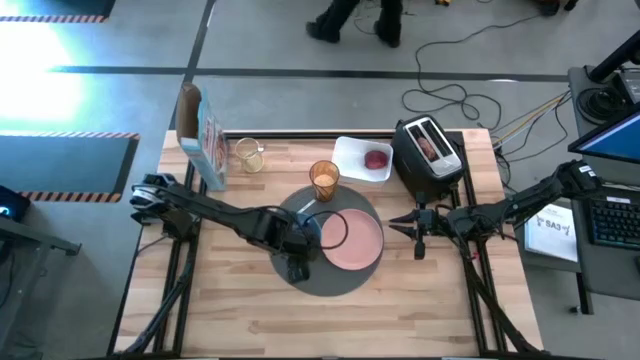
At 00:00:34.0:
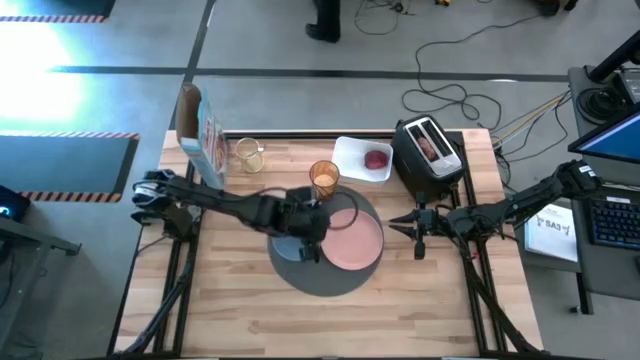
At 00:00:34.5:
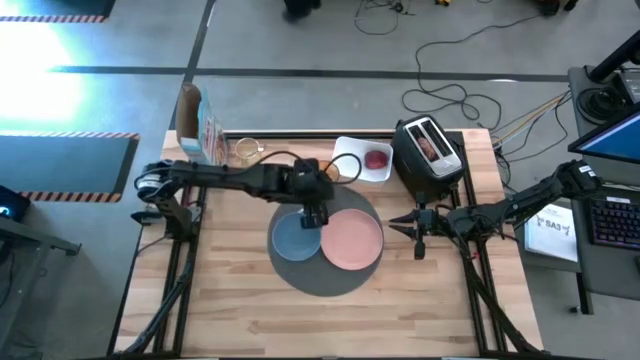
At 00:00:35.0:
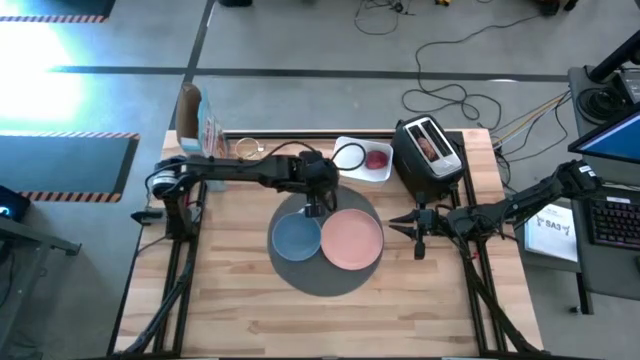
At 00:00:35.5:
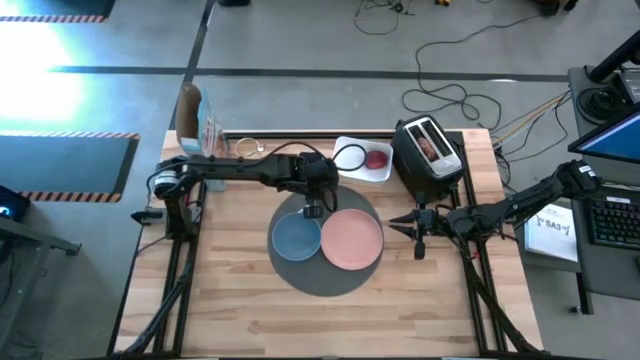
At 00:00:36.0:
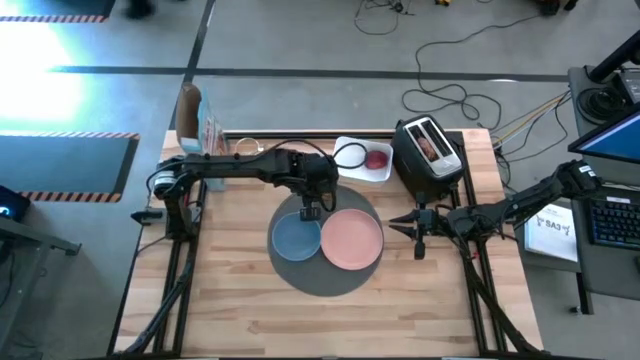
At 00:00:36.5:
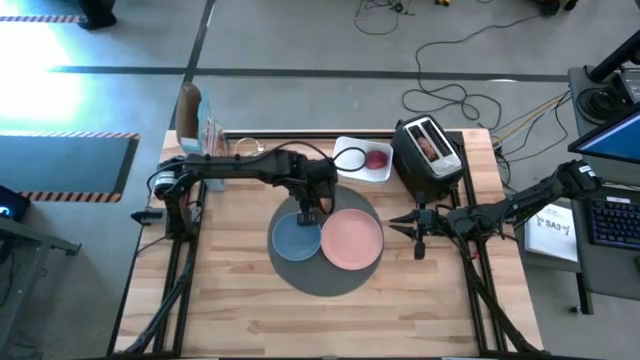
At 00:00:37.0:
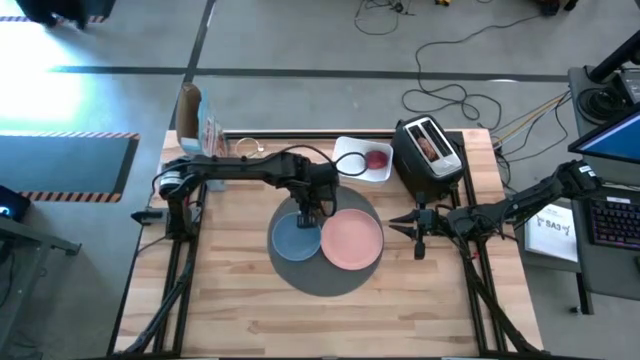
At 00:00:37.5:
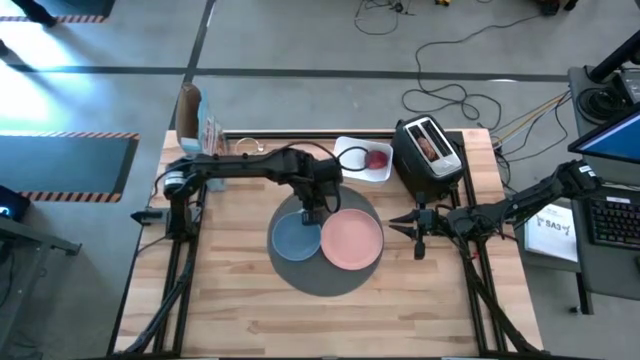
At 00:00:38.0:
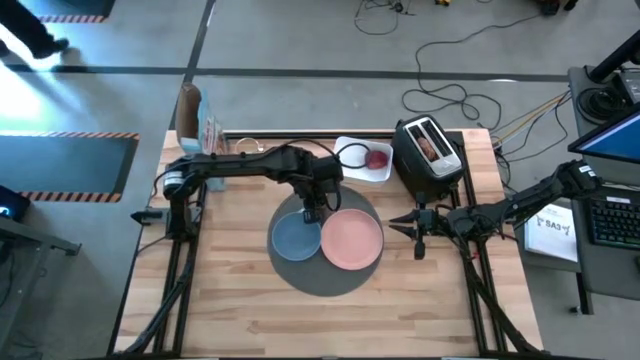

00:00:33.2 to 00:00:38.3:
Task: Arrange a breakfast setting
Adjust the brown glass cup

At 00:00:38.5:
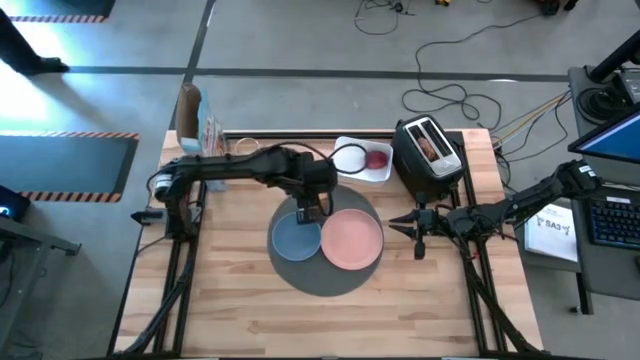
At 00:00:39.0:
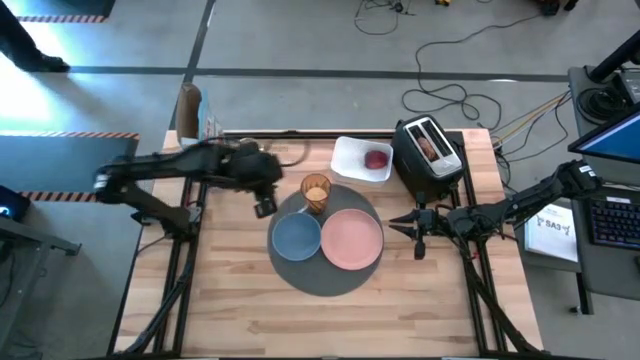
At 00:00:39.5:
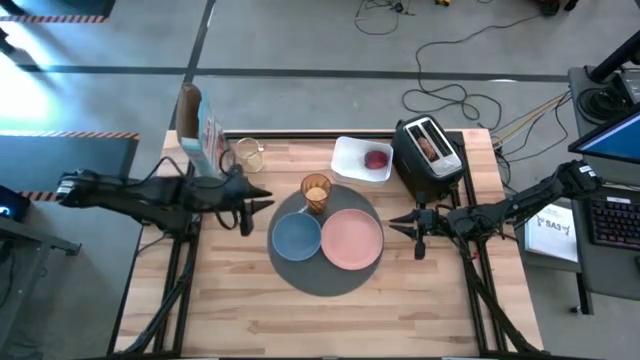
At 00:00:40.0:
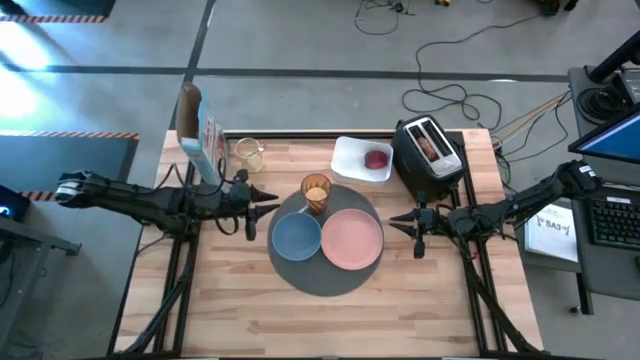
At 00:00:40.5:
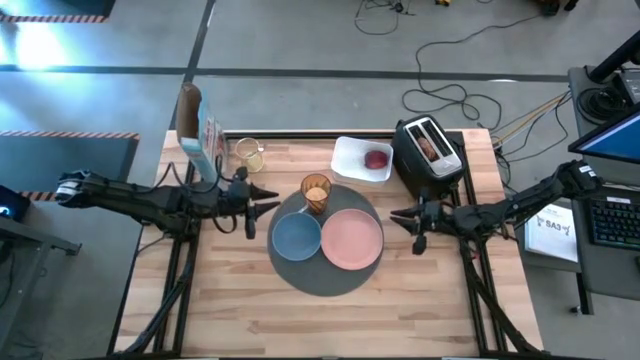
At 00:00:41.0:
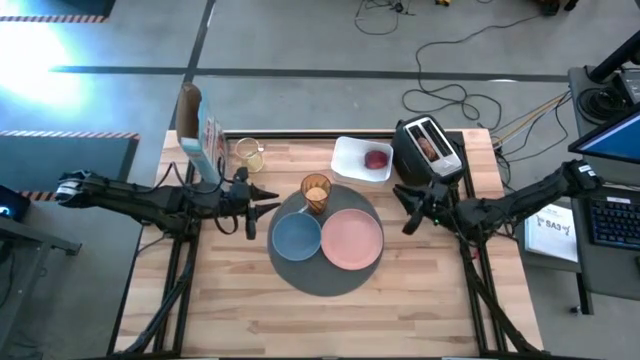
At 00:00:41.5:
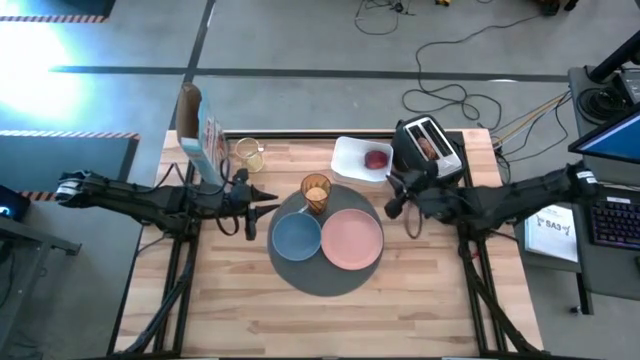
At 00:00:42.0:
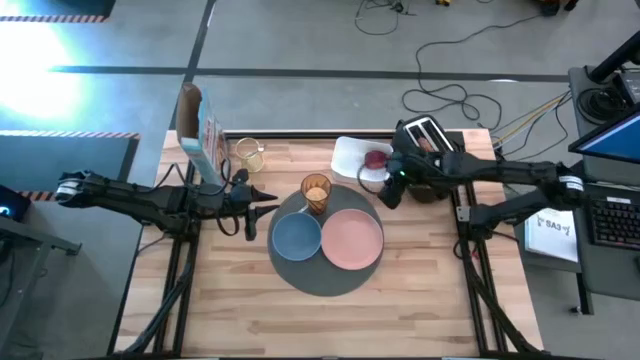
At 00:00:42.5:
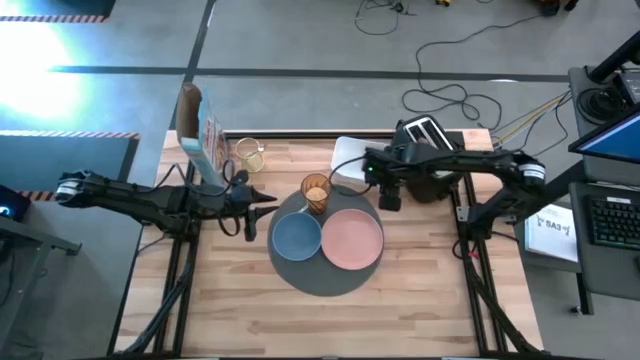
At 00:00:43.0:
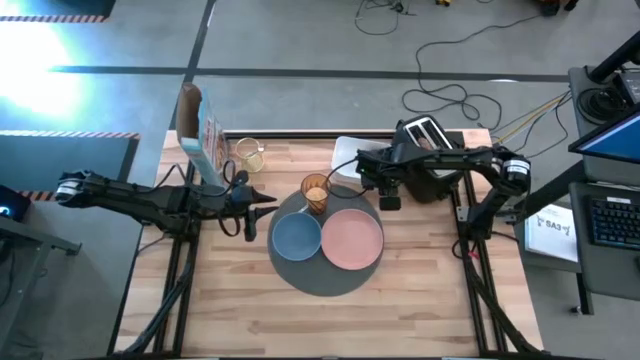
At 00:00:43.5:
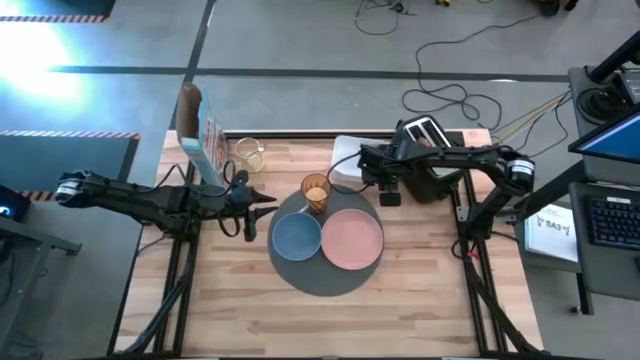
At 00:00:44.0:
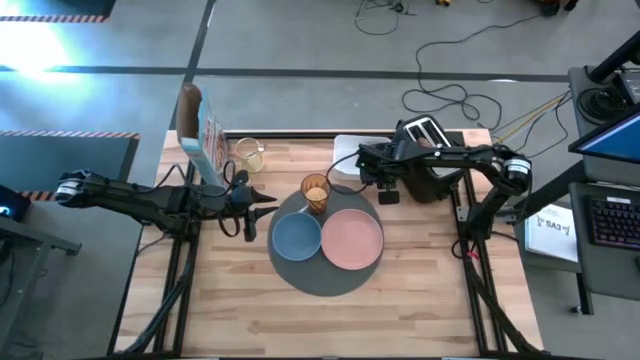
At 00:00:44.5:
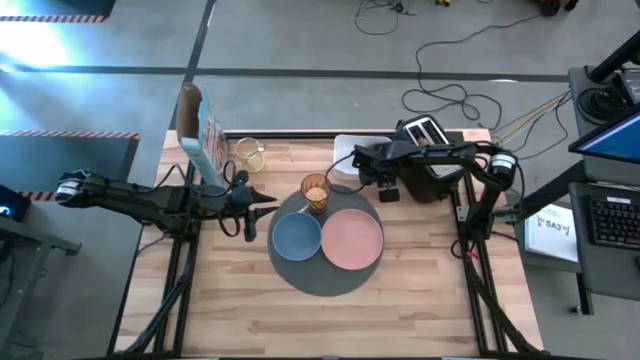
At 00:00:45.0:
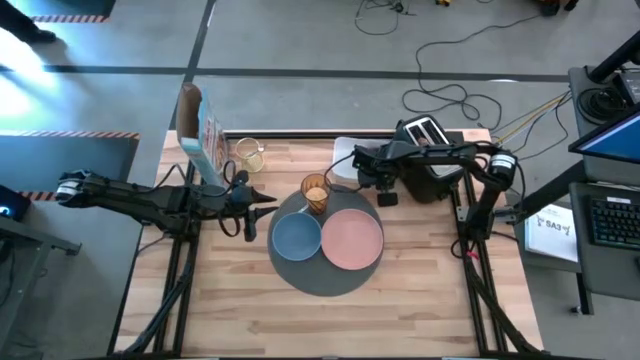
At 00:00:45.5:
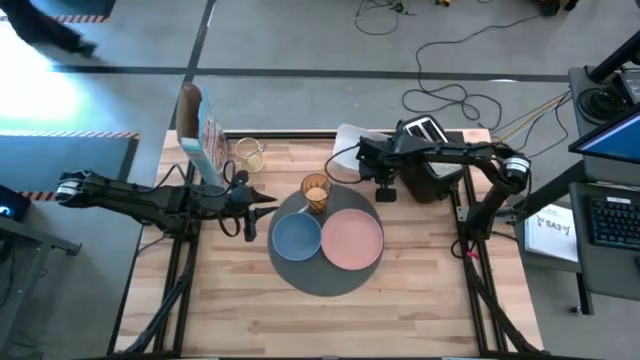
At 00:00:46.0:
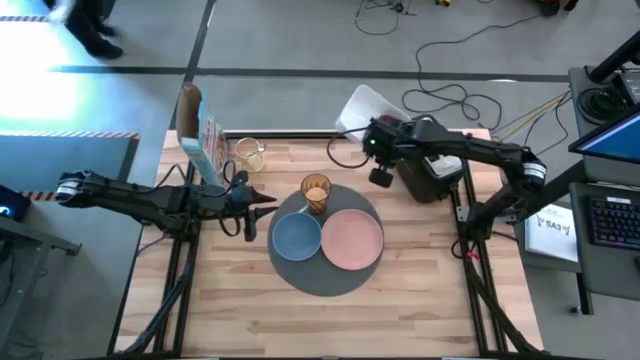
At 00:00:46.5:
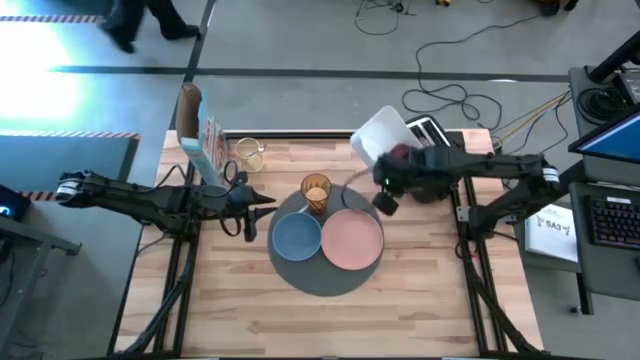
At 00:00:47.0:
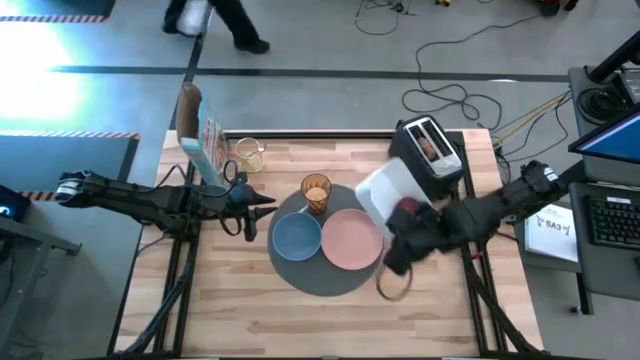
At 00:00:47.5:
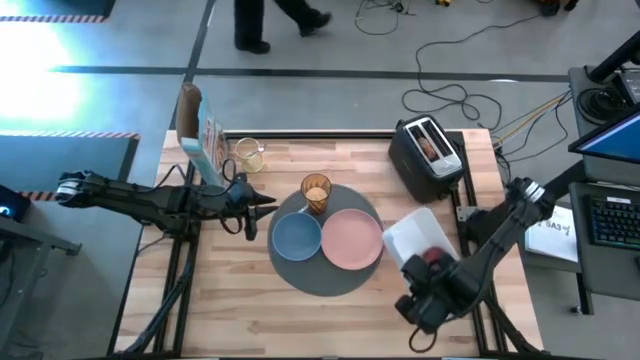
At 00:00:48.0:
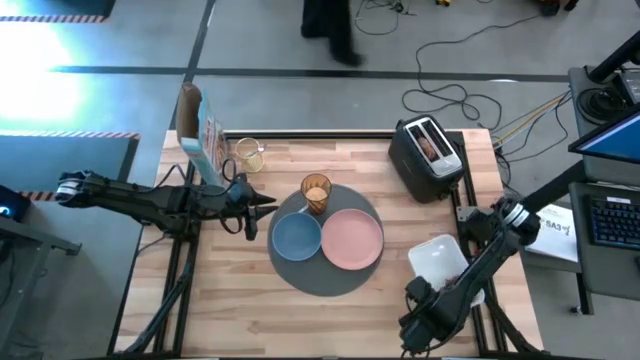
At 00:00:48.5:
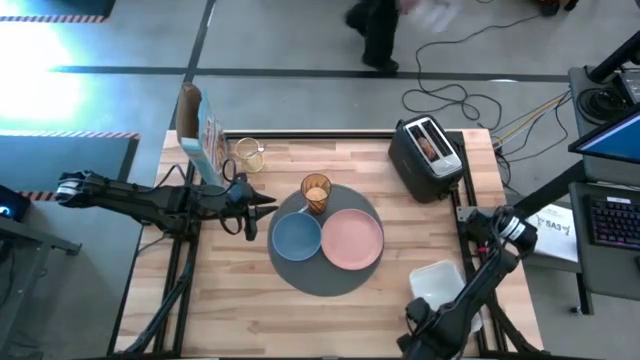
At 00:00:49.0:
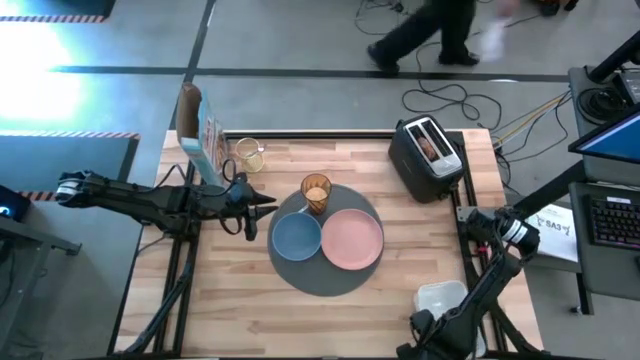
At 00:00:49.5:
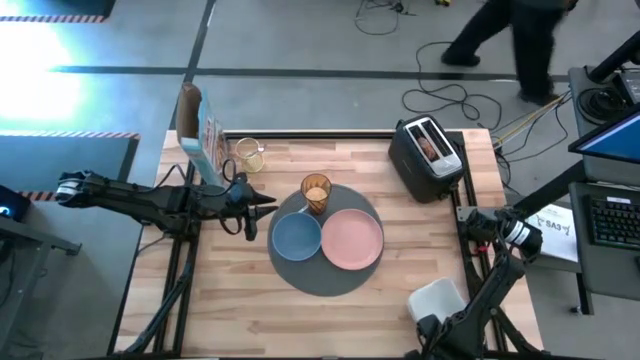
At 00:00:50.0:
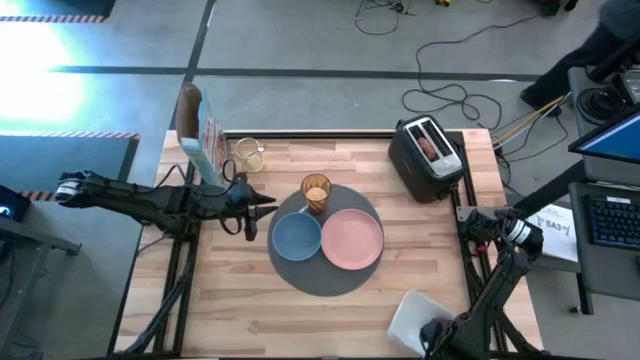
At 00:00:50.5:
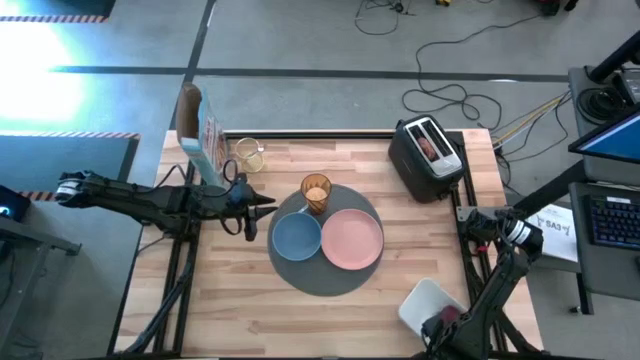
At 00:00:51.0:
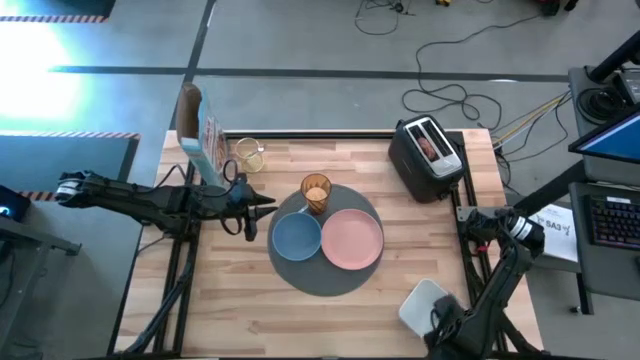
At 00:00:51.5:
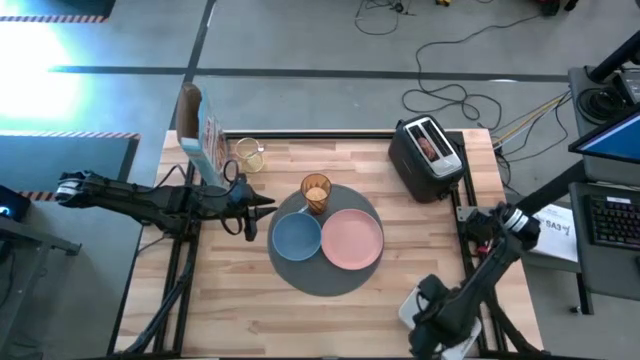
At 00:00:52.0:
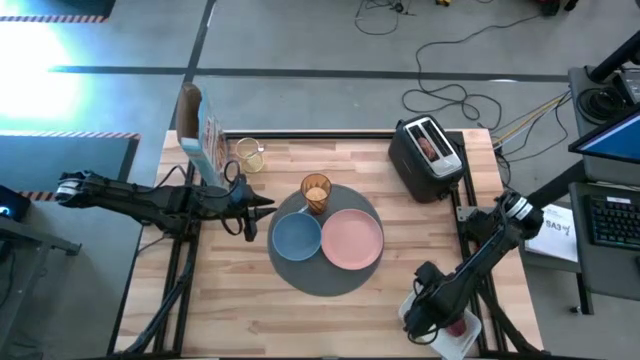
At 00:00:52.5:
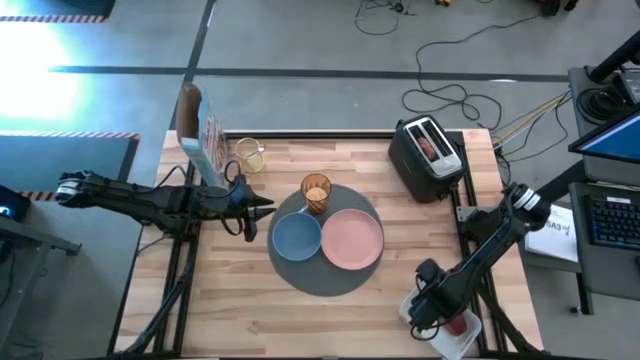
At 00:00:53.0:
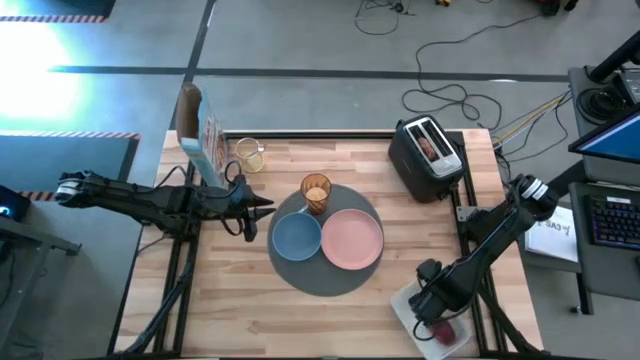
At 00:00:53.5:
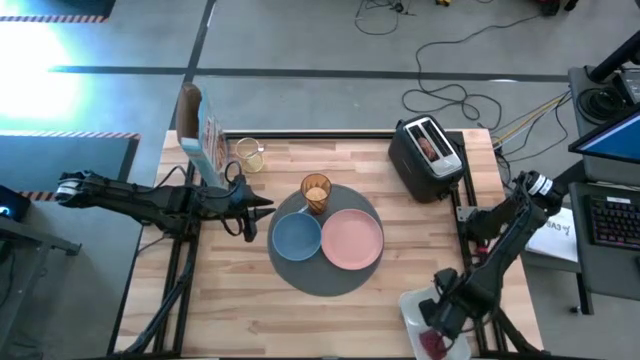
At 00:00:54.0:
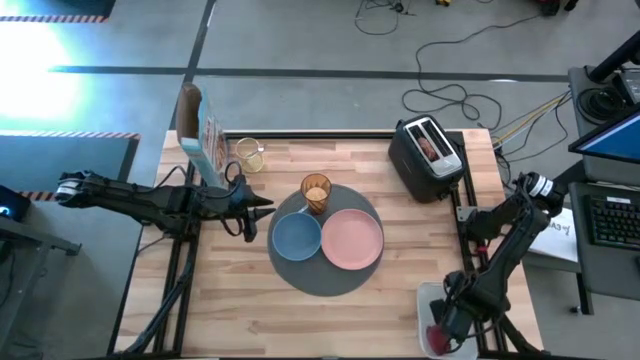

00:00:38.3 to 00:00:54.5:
Move the white bin to the bottom right of the table
